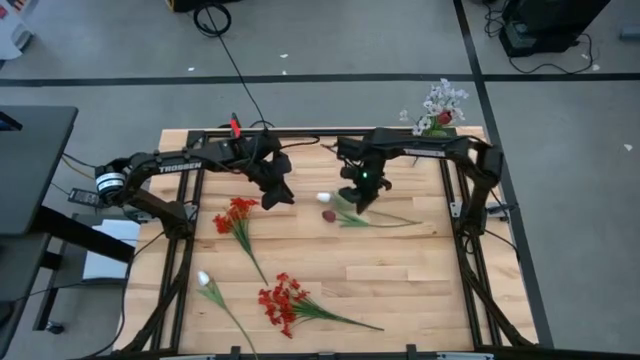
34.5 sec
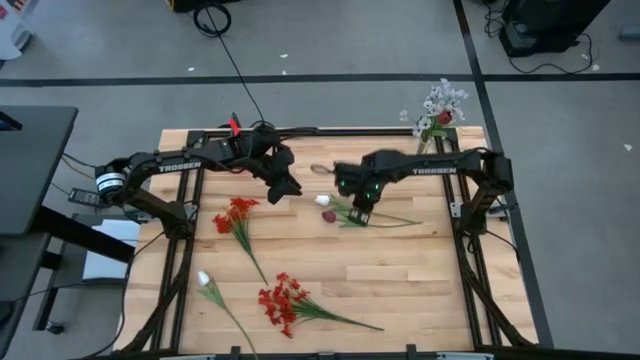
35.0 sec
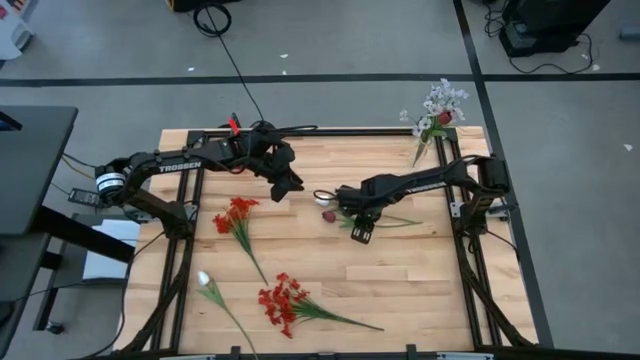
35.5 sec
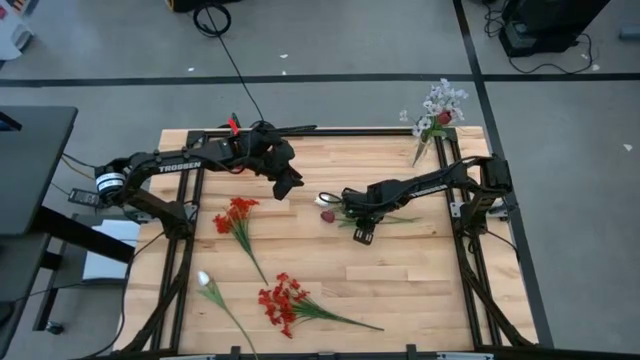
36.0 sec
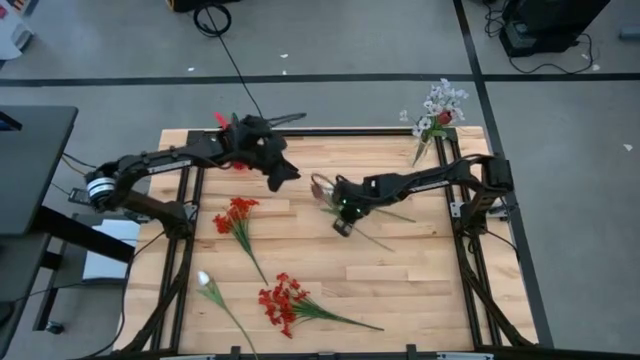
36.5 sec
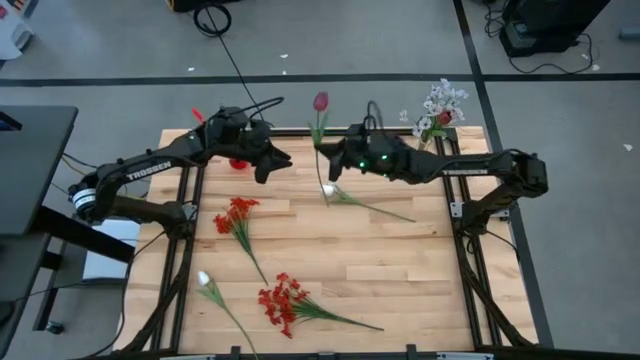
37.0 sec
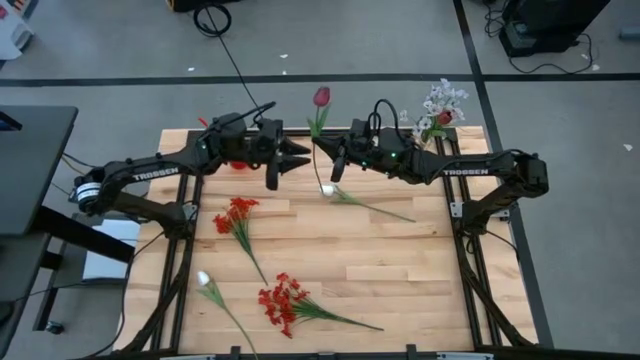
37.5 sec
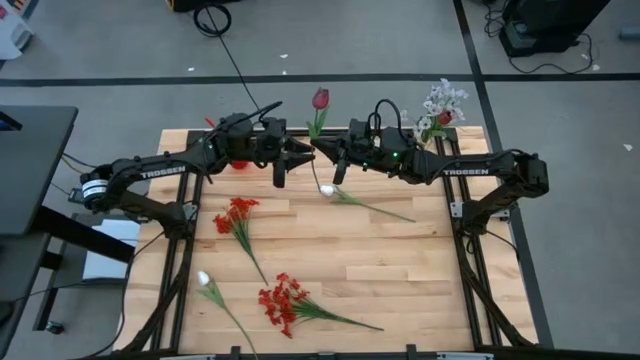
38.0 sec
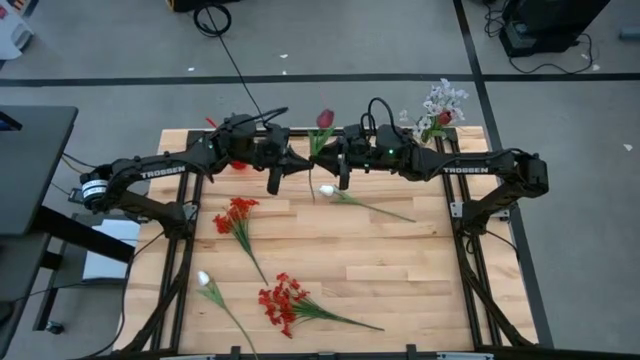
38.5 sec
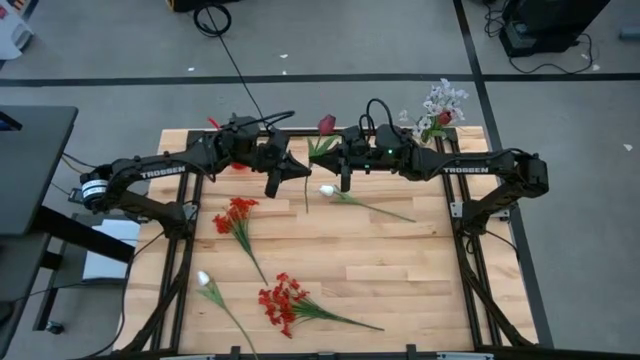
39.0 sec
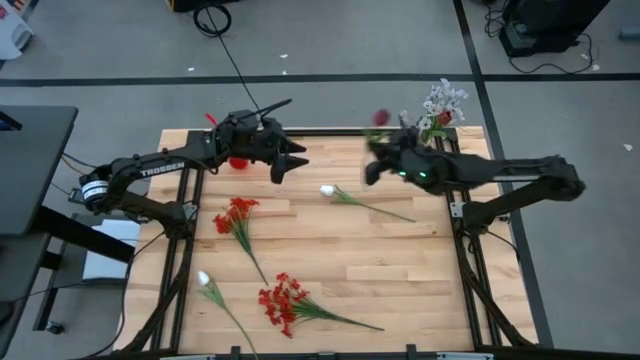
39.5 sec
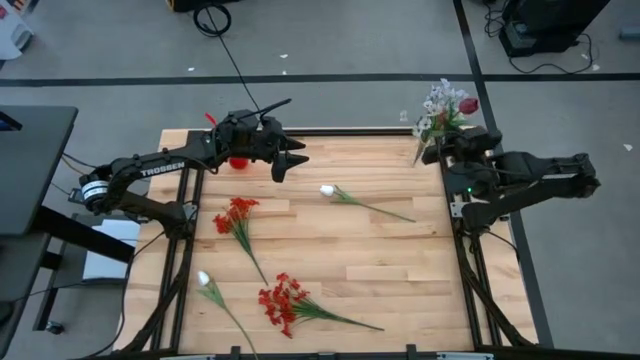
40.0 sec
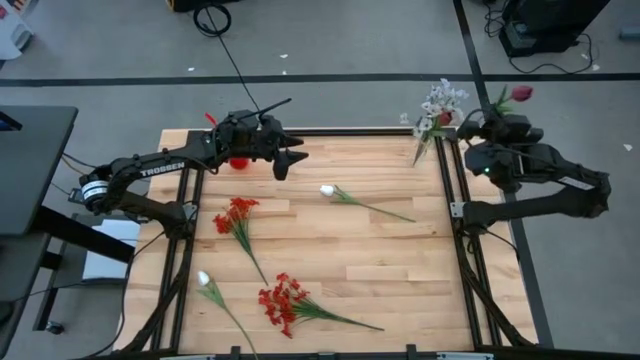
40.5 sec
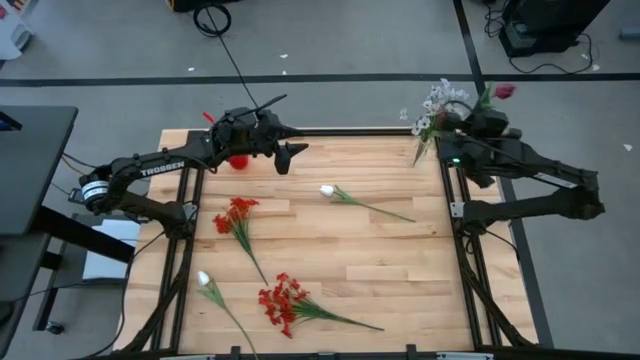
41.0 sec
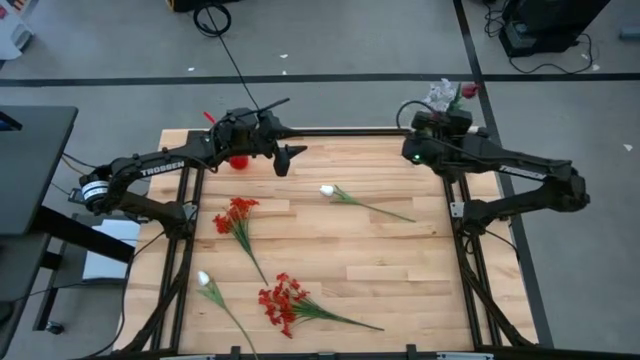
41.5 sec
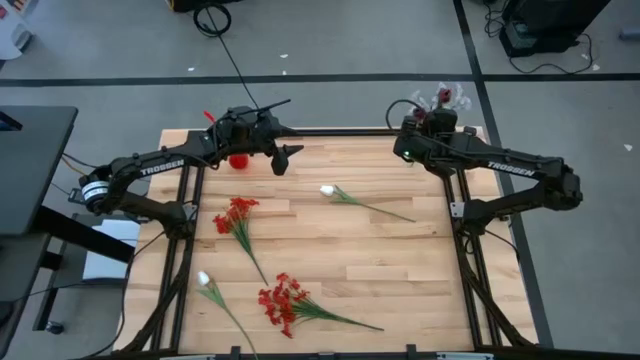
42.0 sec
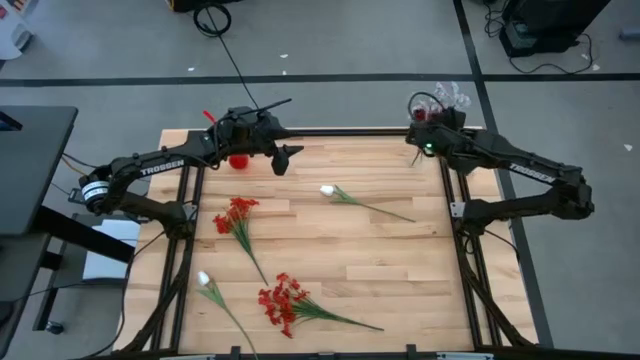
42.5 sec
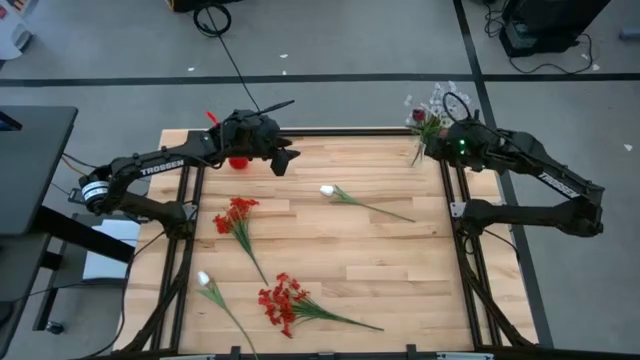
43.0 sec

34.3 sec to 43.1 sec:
Task: Sort flowers into vase by color
Put the dark red flower into the transparent vase

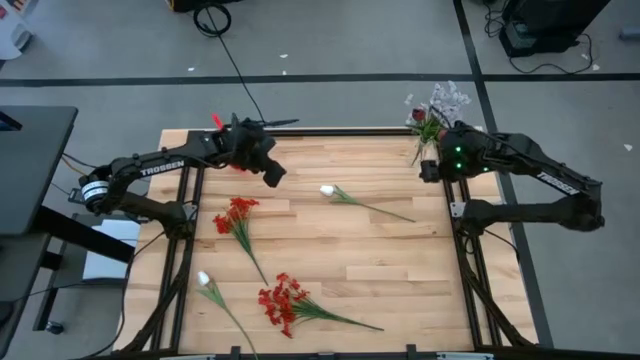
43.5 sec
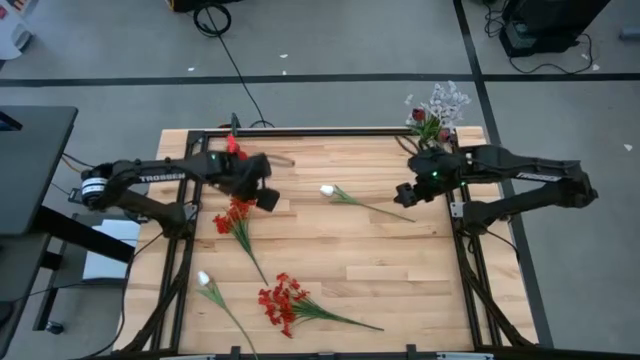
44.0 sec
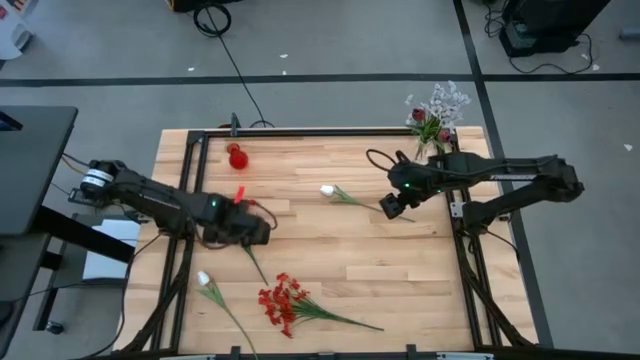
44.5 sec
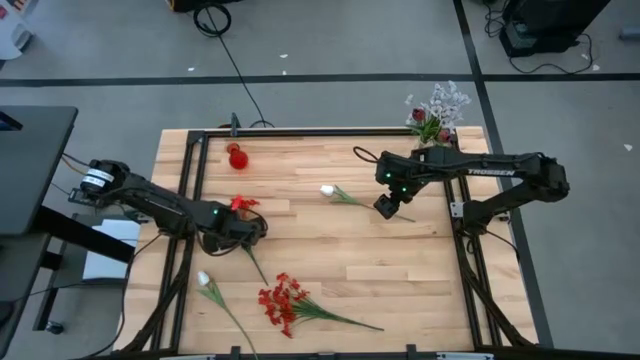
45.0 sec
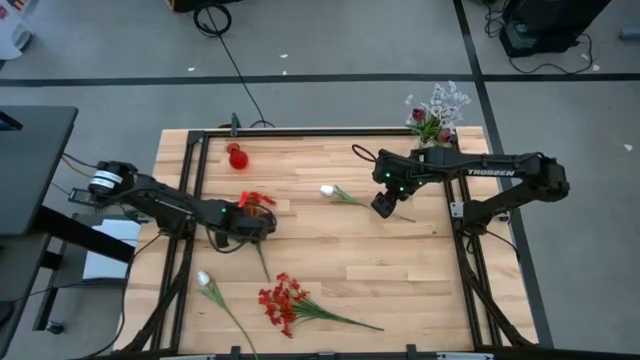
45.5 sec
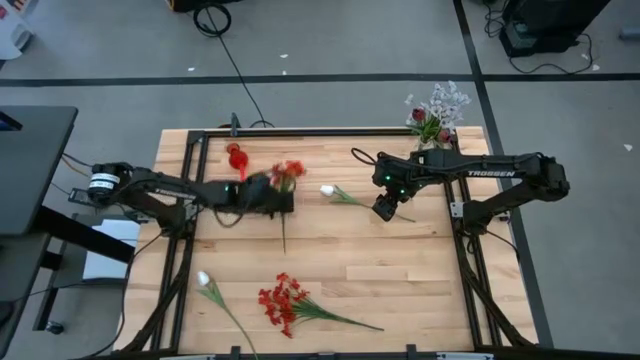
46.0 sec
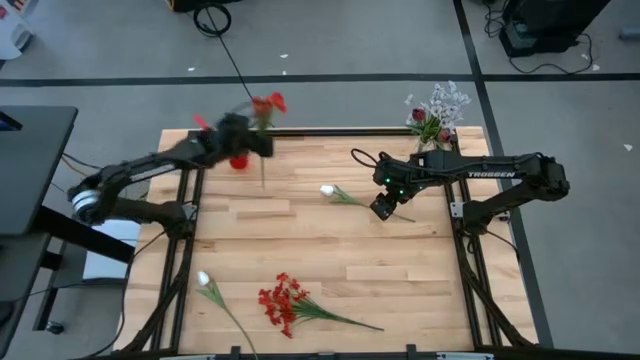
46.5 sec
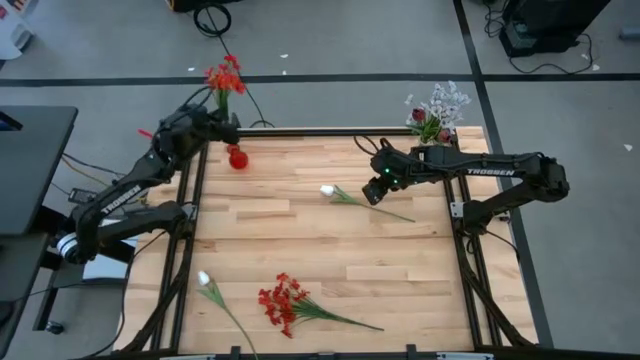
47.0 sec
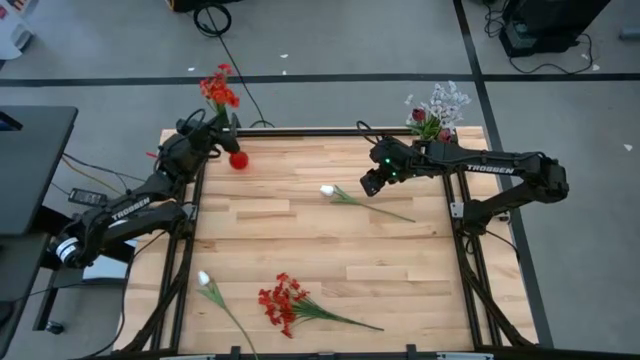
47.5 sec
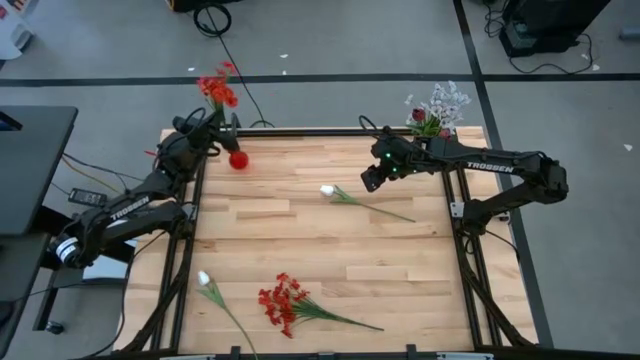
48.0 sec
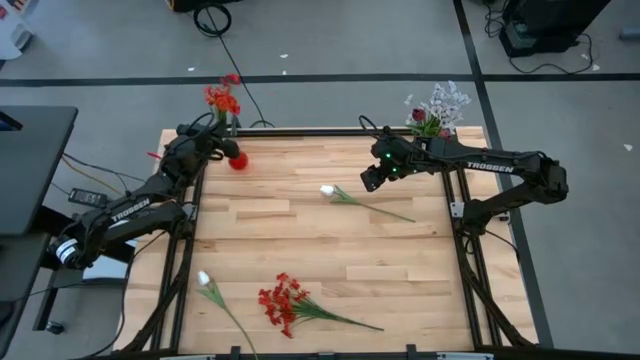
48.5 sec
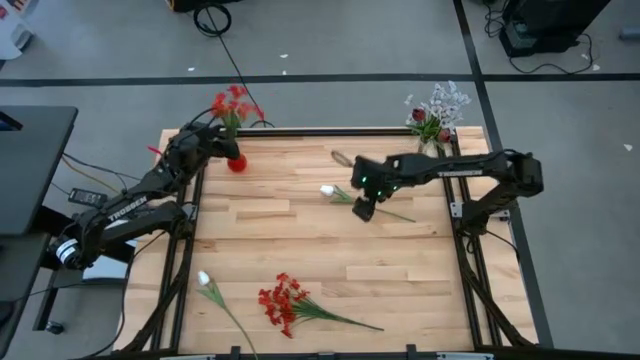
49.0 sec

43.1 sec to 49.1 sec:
Put the top red flowers into the red vase

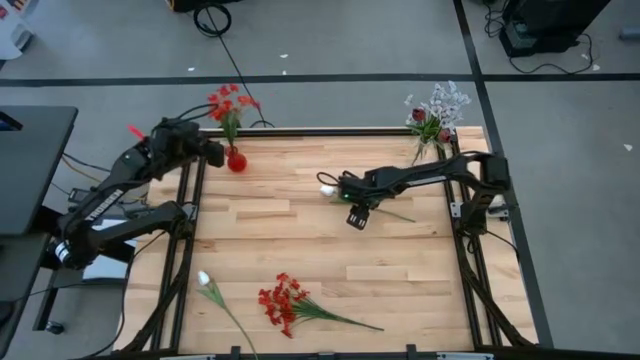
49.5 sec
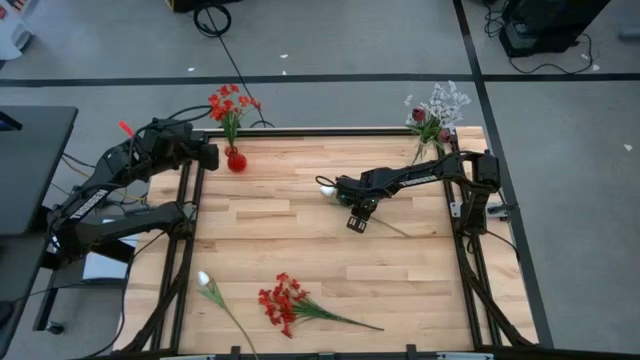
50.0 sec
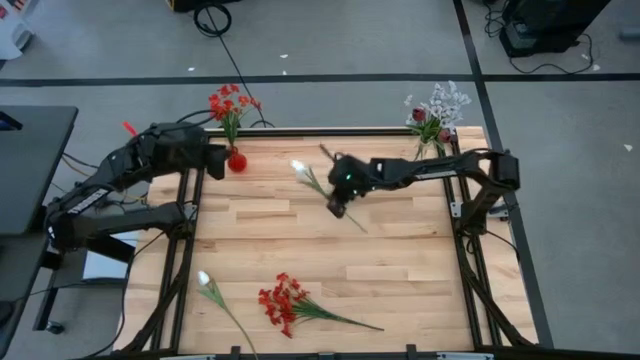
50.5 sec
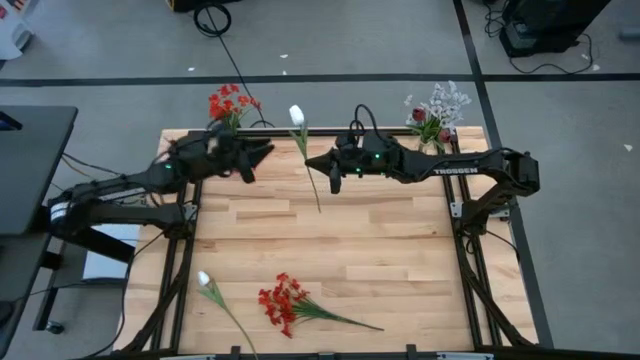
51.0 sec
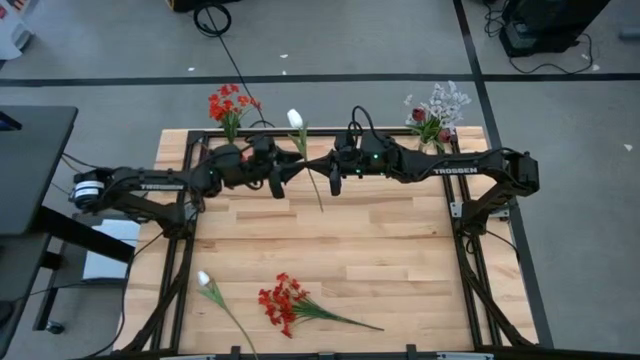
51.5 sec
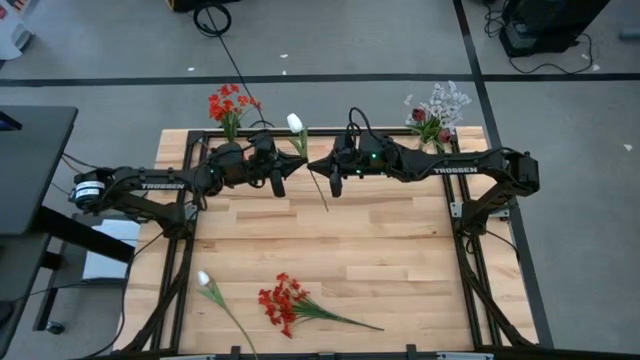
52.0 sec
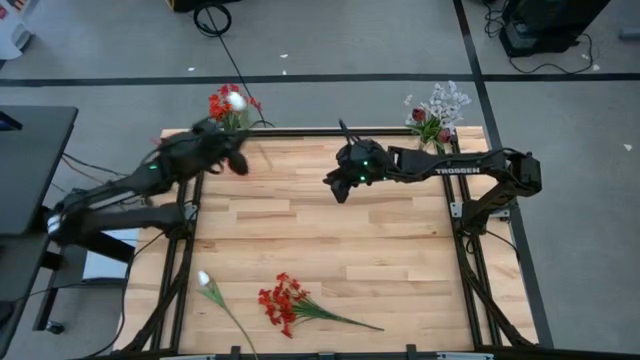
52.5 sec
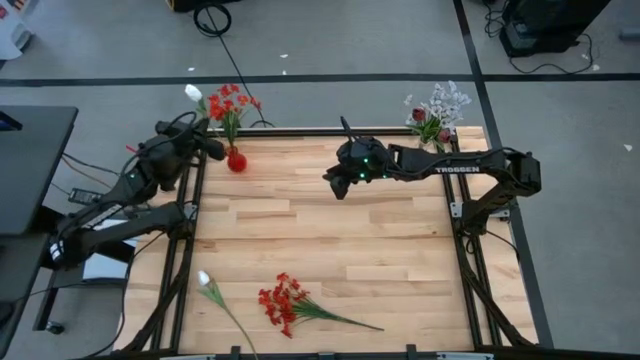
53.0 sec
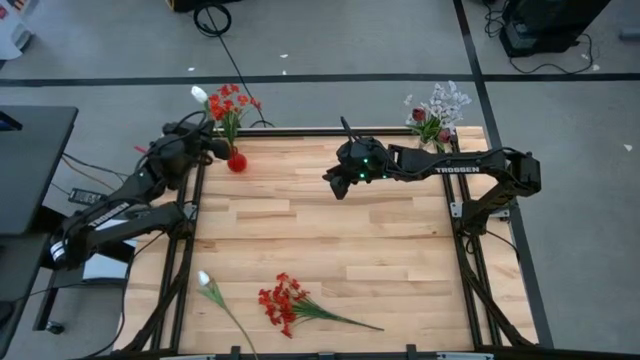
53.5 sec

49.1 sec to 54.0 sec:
Put the top white flower into the red vase

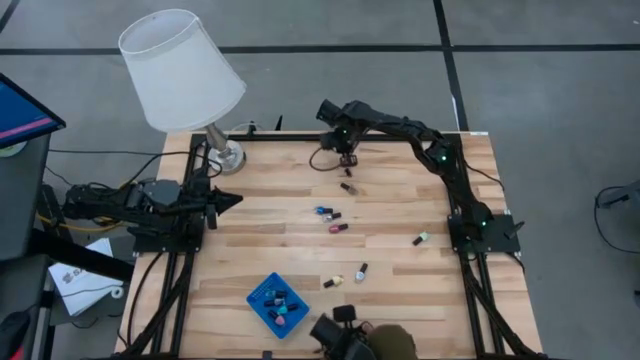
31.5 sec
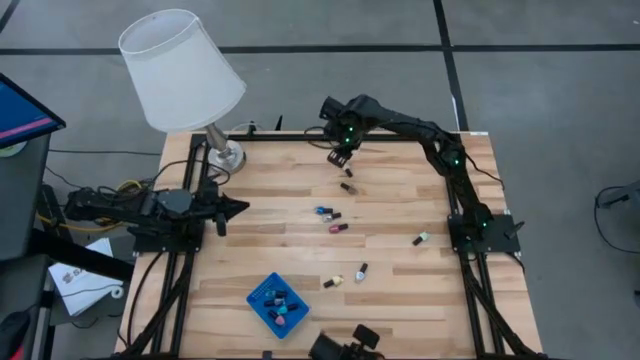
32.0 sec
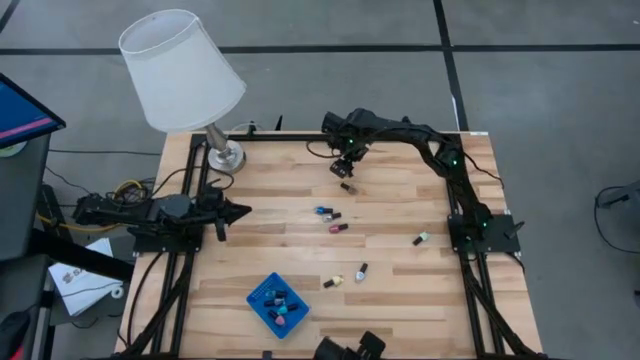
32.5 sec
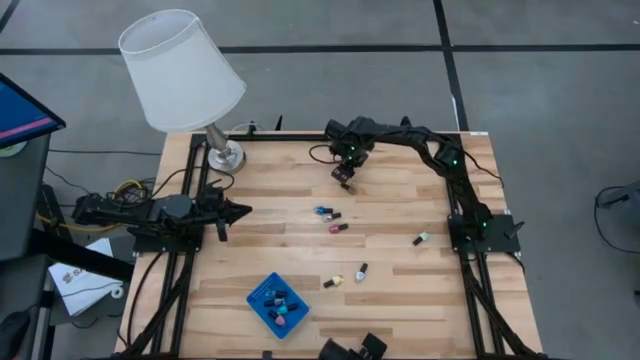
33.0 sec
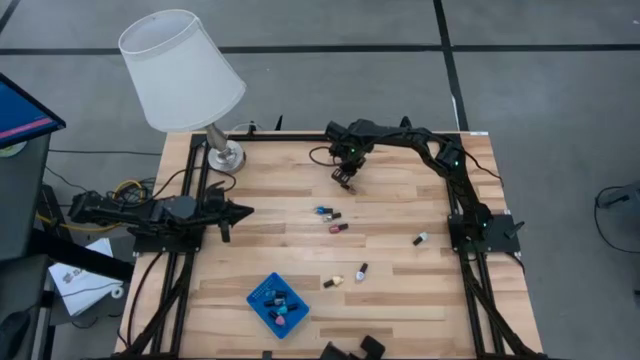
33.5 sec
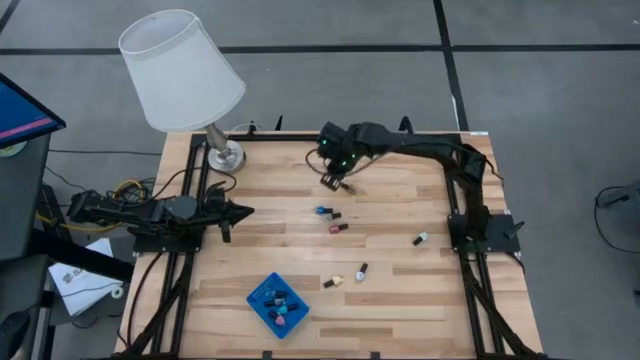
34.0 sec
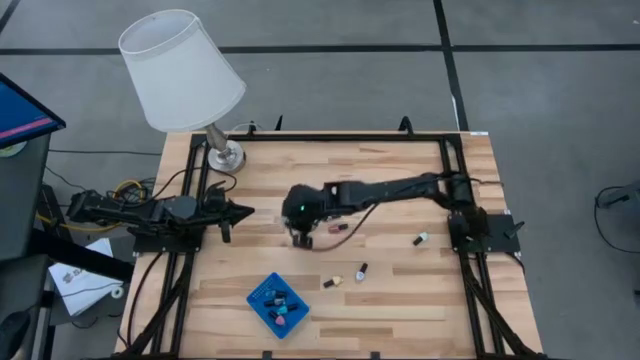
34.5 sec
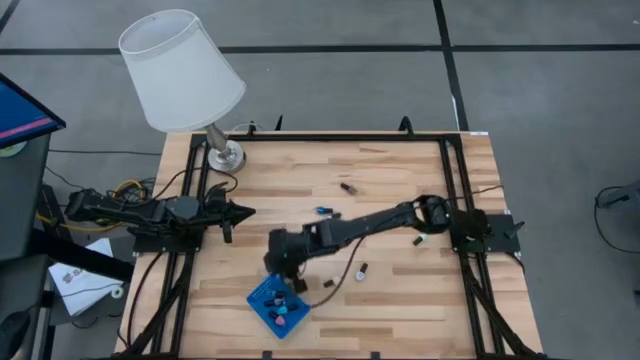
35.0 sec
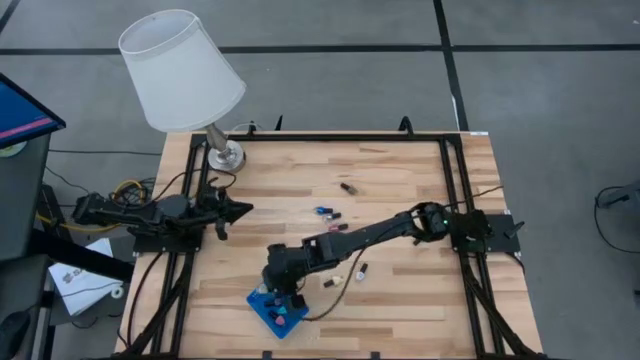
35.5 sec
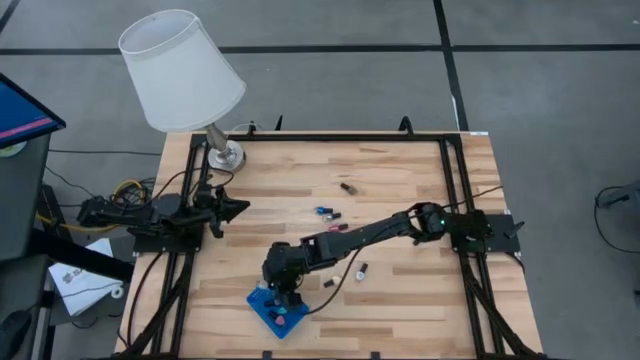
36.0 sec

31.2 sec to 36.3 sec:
Task: Pick & Place Nail Polish
Put the top left white nail polish bottle in the blue bin
